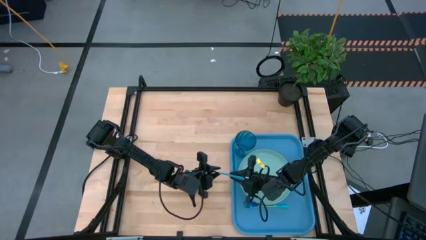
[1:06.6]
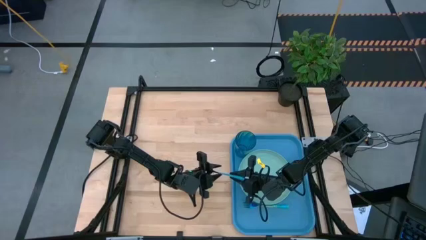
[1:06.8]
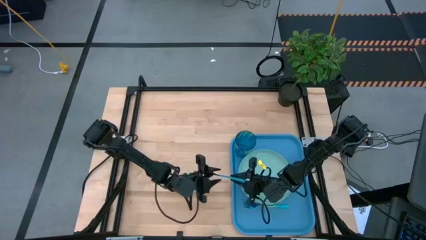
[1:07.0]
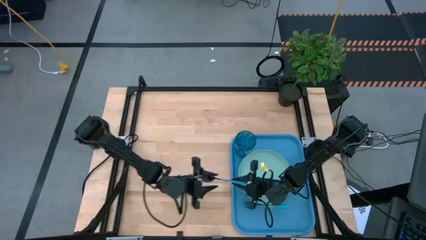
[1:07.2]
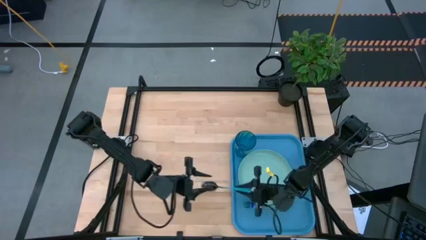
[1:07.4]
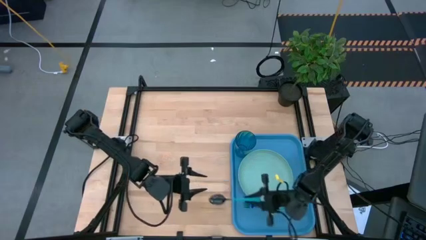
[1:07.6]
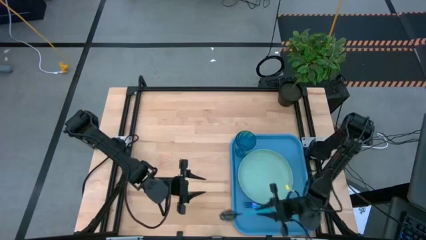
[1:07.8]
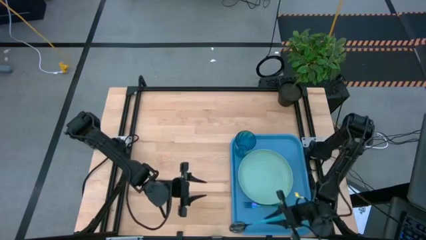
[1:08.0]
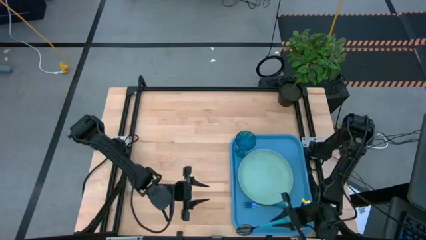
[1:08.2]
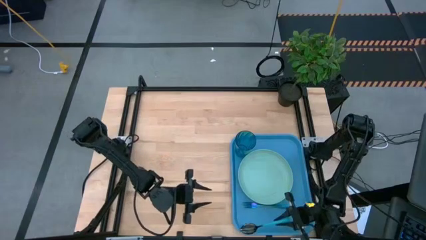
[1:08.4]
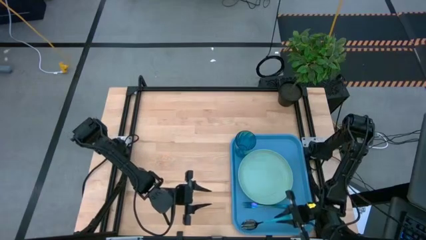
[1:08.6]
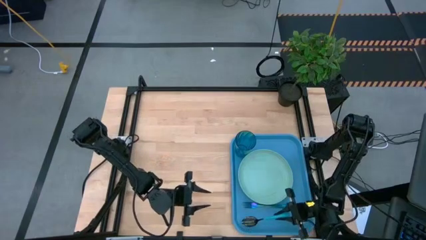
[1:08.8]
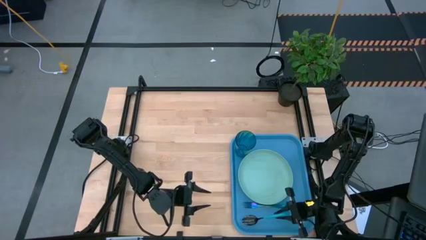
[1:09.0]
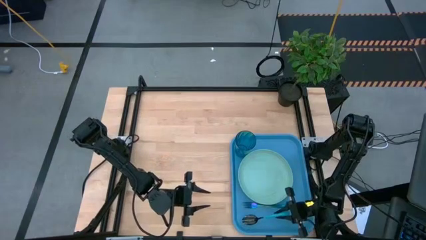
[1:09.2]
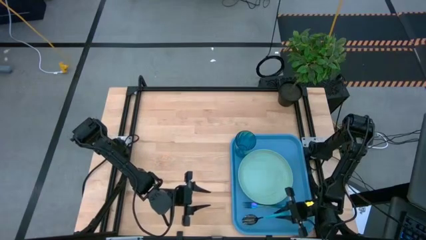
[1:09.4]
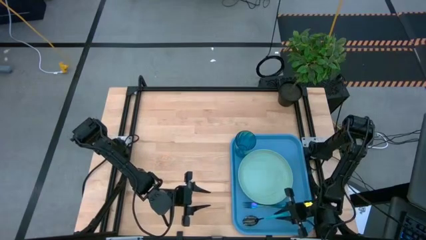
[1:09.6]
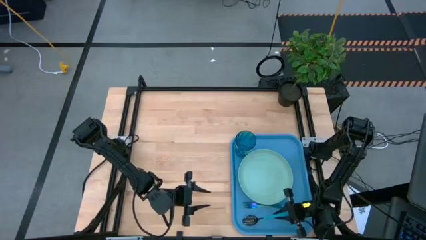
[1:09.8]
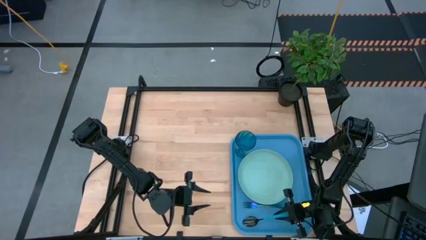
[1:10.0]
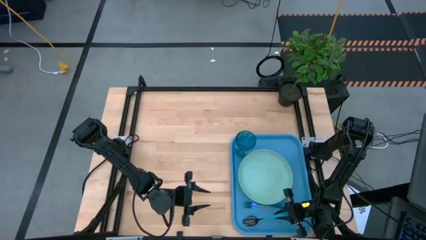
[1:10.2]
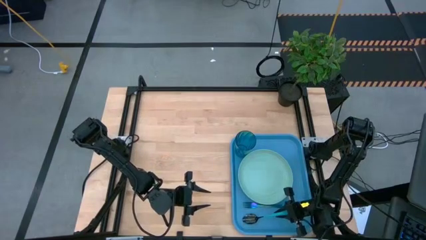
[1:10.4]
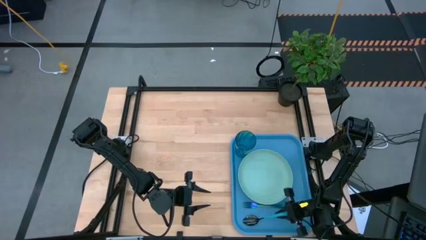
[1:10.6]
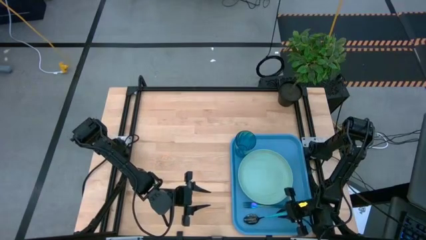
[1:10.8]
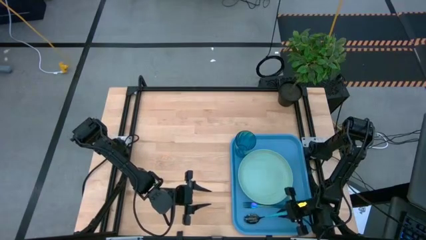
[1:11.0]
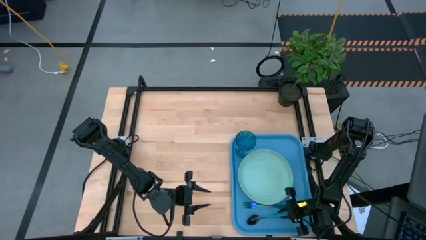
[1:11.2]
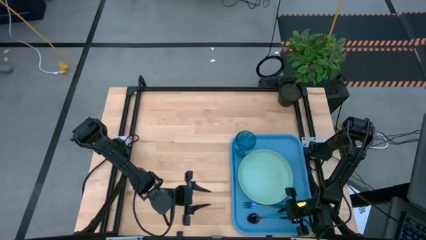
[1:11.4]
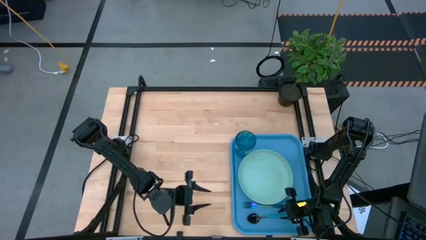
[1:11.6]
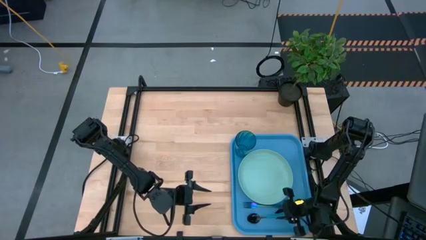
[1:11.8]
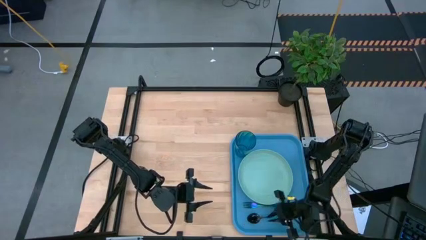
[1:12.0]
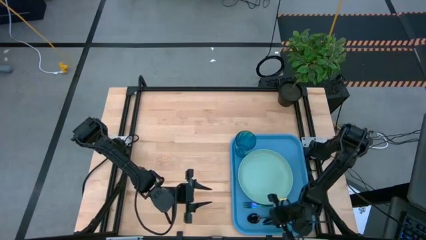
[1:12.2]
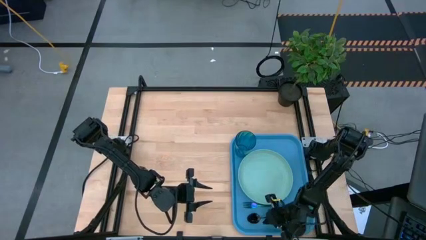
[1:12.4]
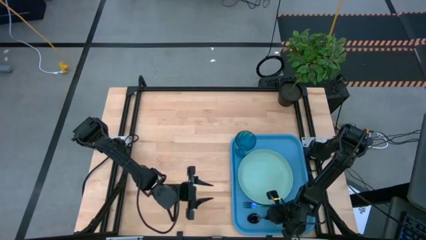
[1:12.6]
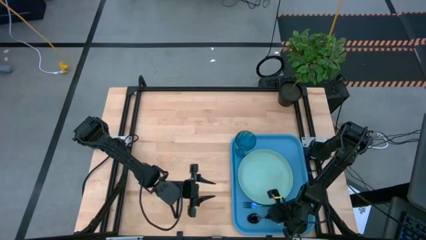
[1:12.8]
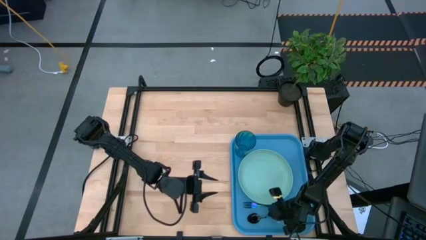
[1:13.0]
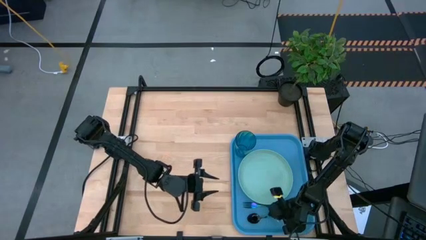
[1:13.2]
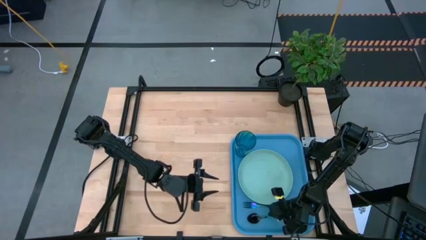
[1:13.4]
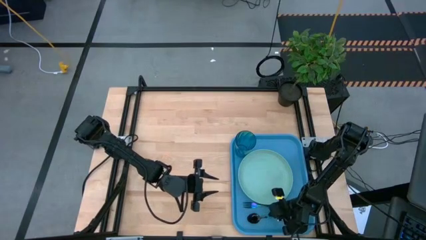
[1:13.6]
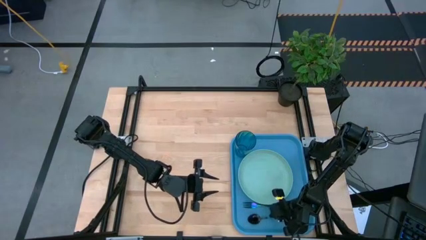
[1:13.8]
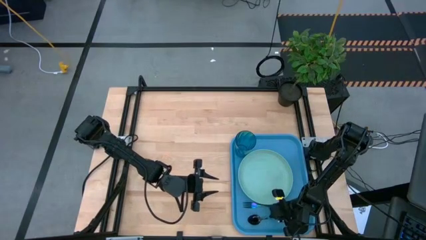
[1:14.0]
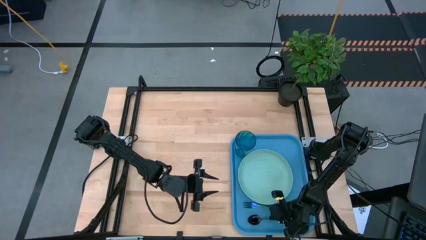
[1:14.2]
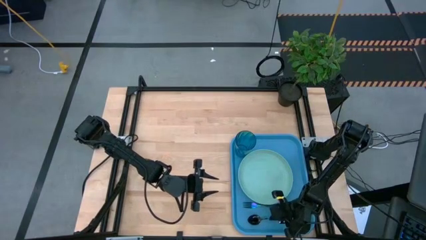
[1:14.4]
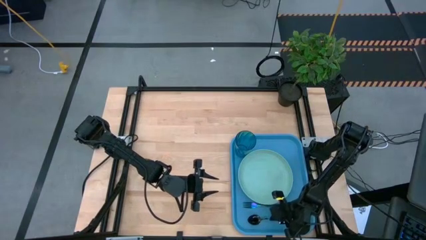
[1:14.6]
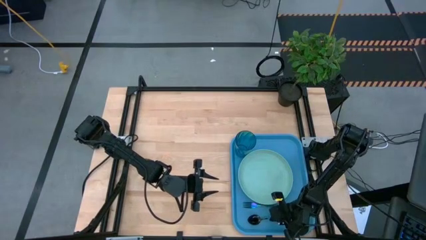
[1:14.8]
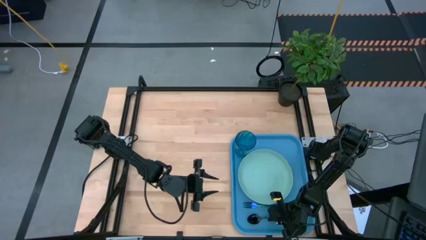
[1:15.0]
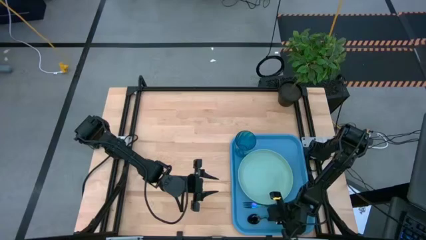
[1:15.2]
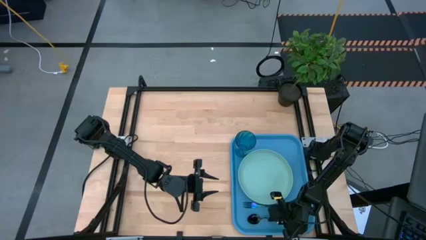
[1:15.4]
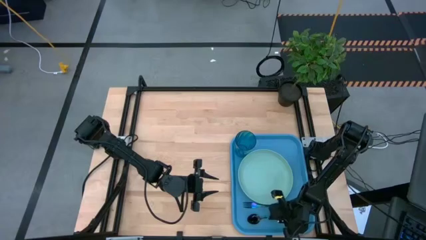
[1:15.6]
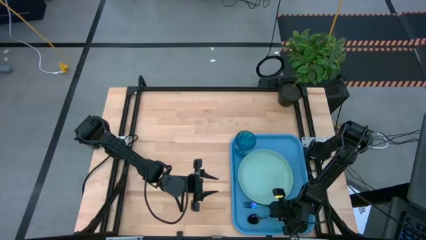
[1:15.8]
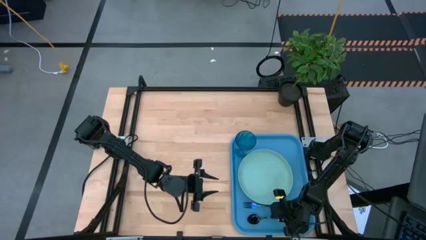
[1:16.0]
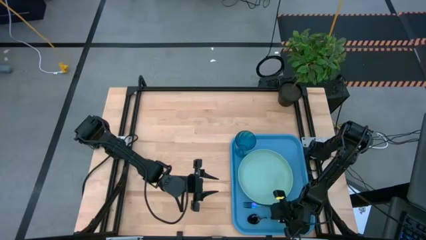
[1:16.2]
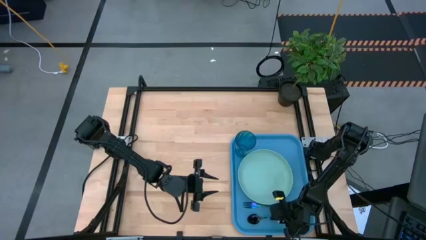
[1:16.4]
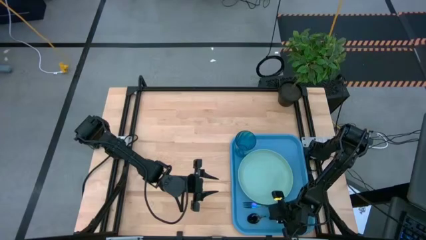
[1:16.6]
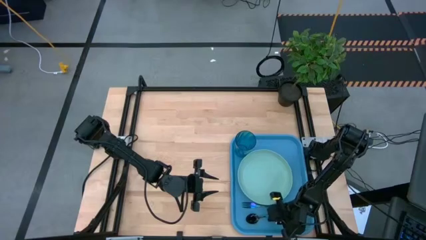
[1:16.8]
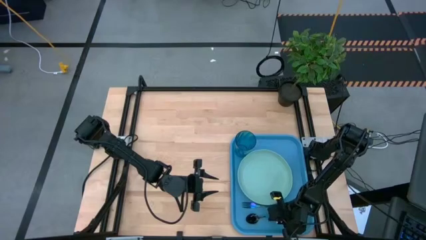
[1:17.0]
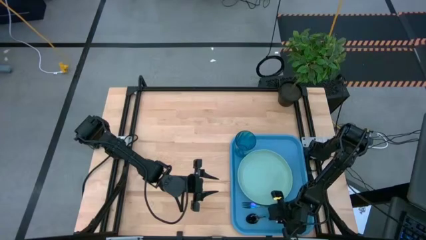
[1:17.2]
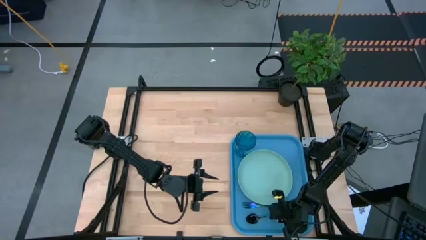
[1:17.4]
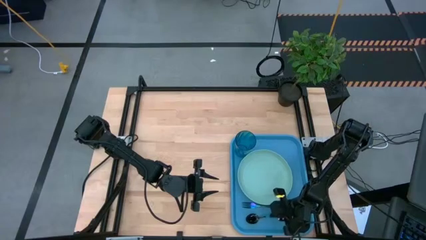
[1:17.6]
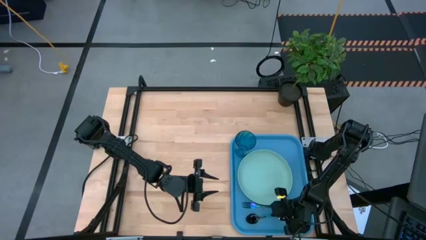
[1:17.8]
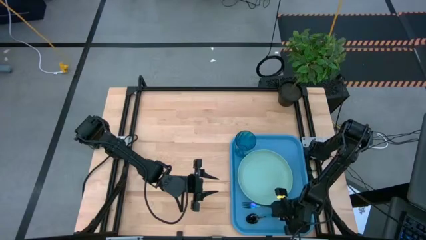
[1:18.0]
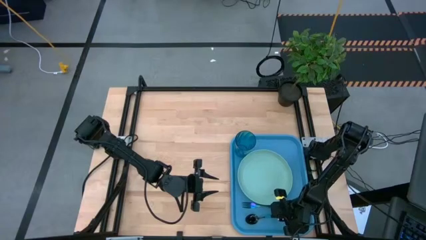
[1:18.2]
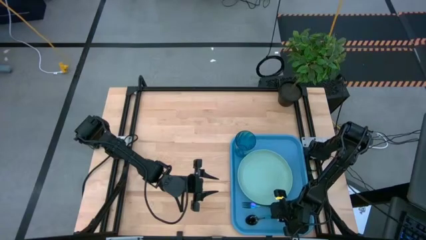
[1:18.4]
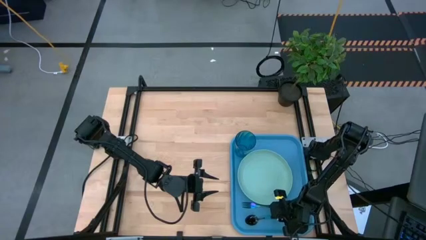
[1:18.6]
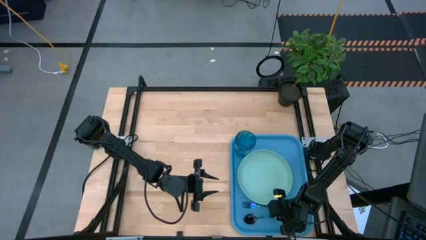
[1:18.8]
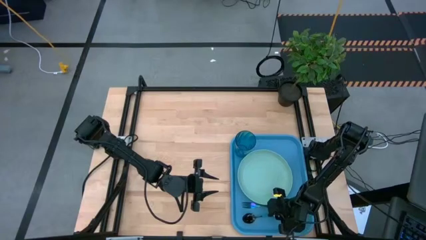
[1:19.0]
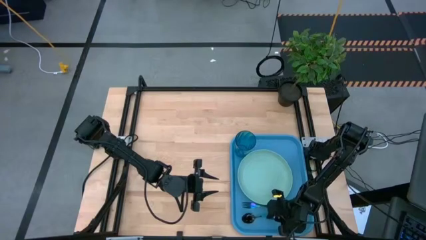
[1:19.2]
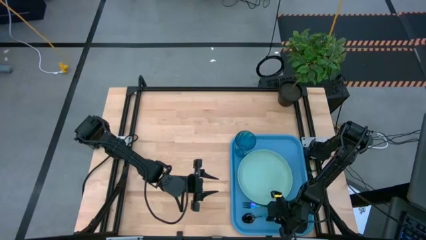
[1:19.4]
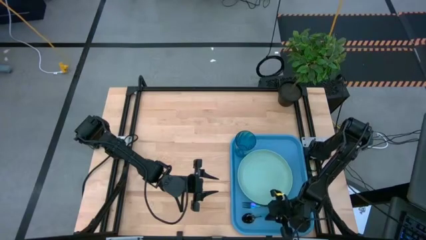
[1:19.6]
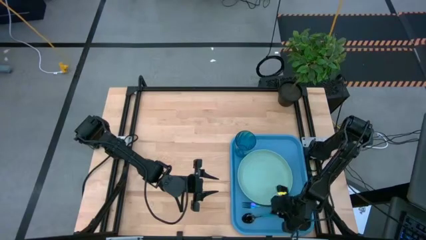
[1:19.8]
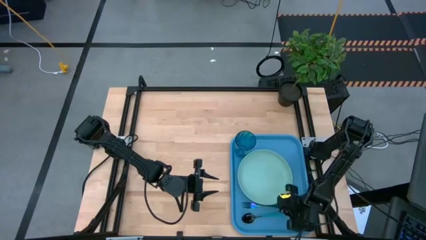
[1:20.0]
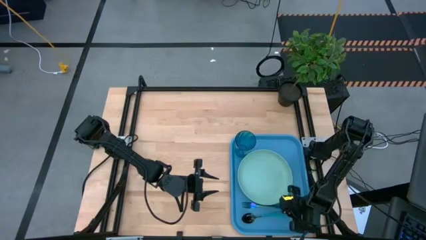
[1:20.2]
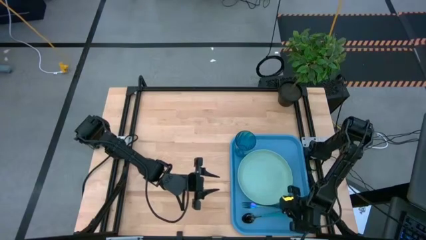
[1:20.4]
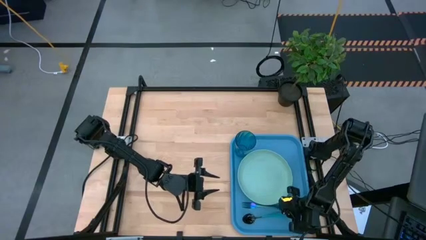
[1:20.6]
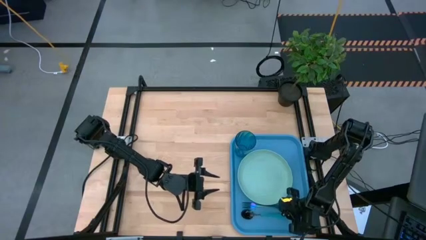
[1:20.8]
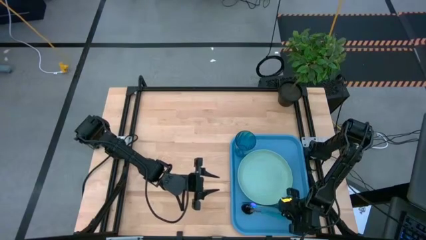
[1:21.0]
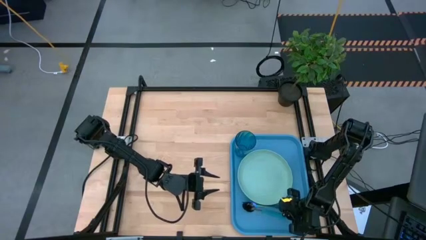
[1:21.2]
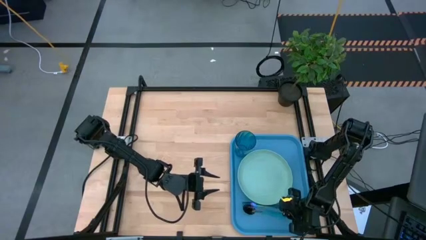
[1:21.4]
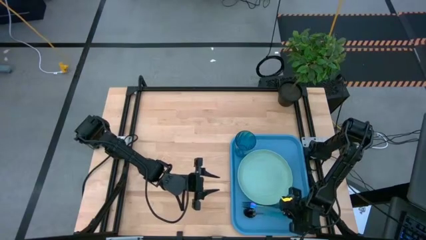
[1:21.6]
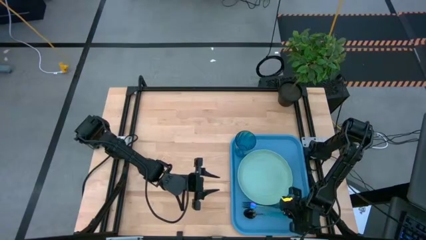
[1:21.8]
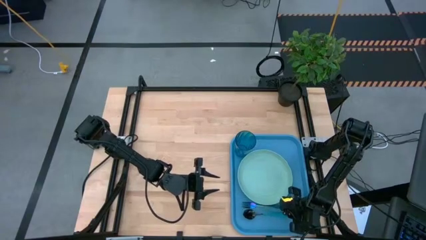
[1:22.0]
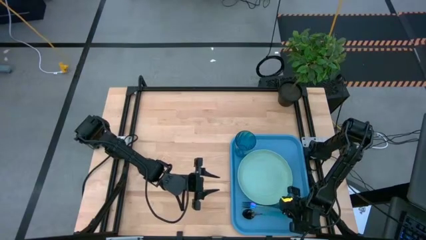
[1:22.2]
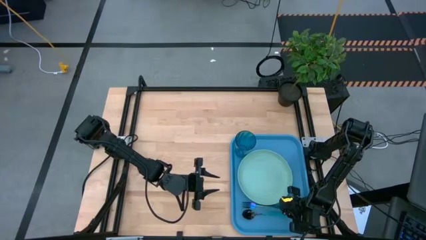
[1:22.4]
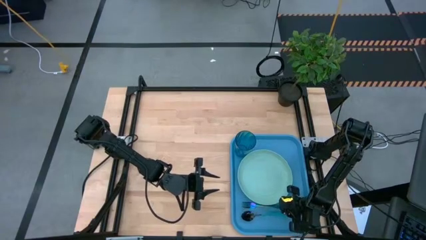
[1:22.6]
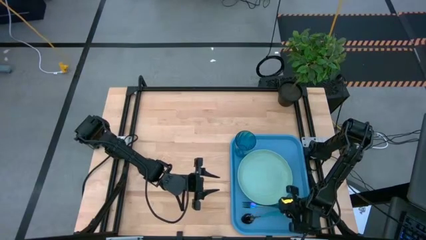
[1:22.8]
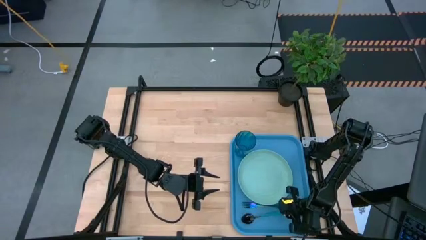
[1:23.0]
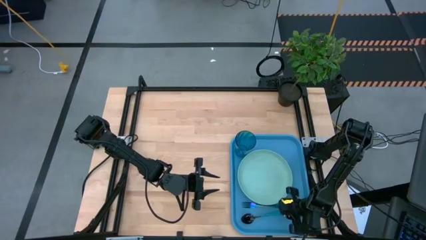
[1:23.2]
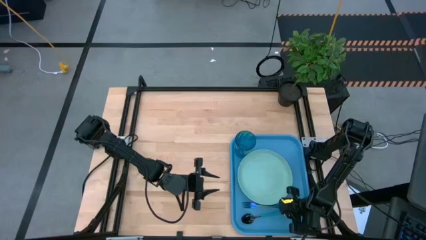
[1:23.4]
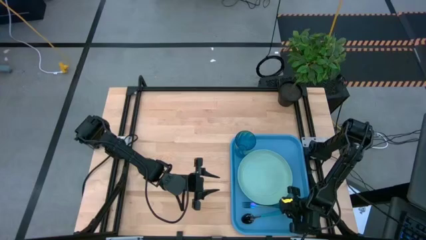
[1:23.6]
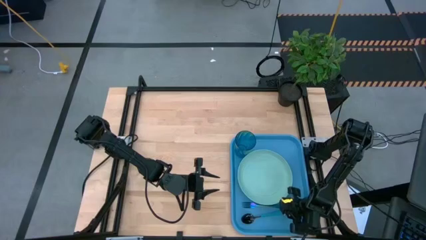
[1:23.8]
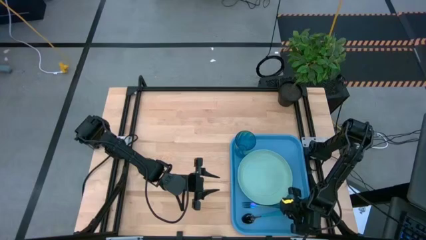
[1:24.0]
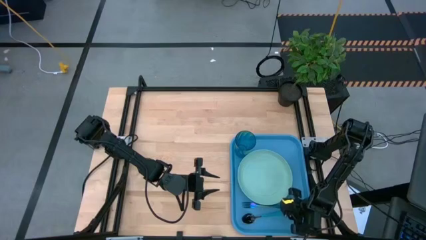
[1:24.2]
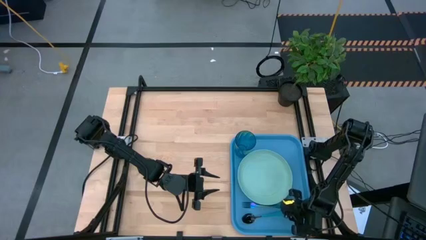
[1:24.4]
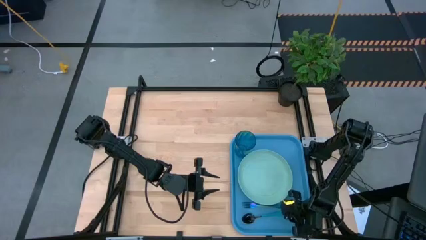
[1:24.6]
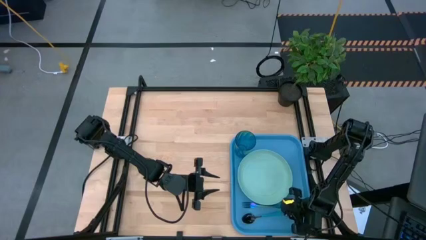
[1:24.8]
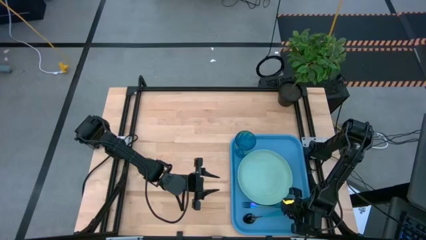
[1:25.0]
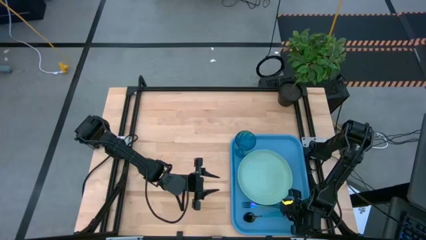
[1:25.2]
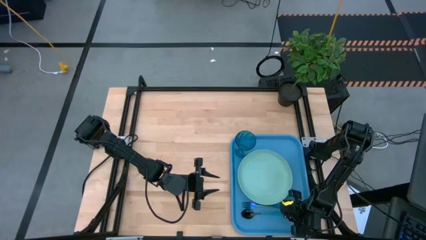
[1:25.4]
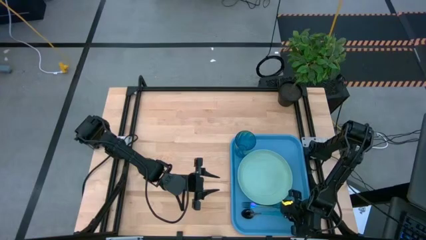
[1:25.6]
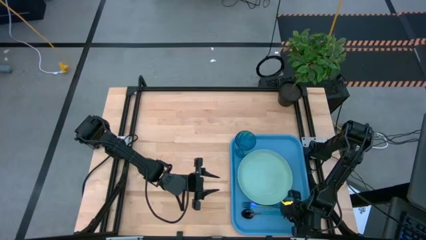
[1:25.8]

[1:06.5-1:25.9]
Task: Pick and place plate/cup/fork/spoon on tray
Put the blue spoon on the blue serving tray to the left of the blue fork
